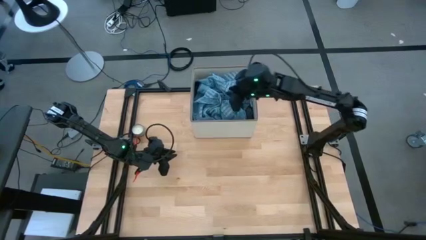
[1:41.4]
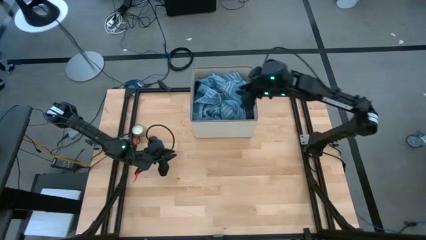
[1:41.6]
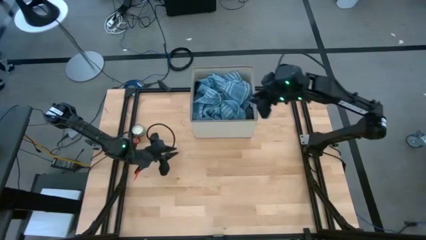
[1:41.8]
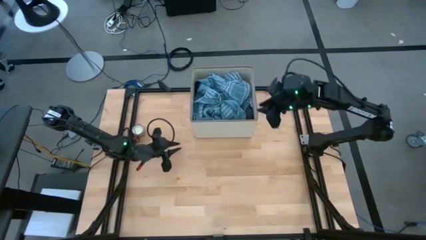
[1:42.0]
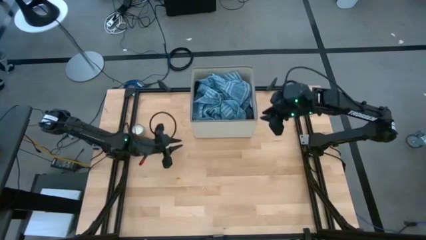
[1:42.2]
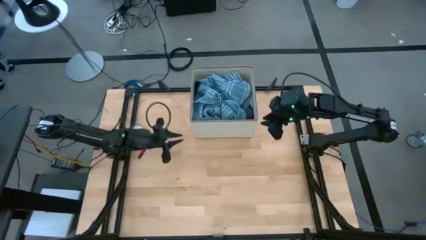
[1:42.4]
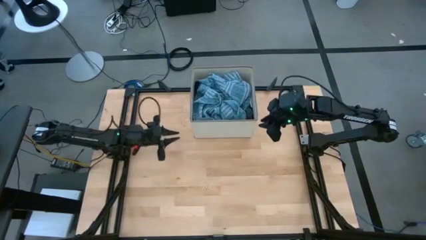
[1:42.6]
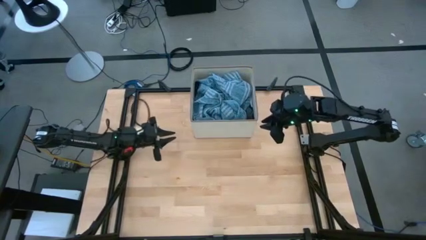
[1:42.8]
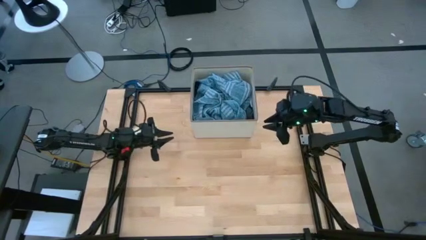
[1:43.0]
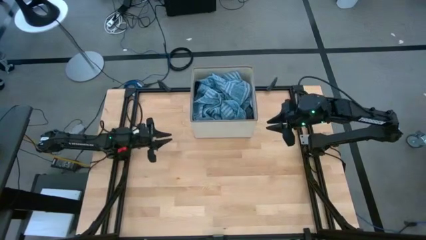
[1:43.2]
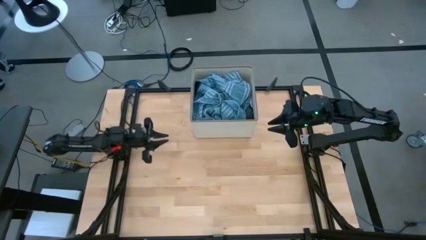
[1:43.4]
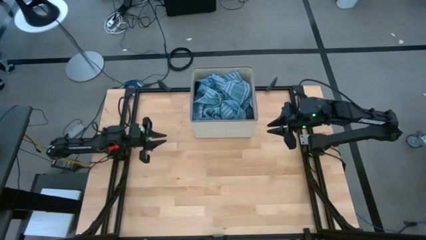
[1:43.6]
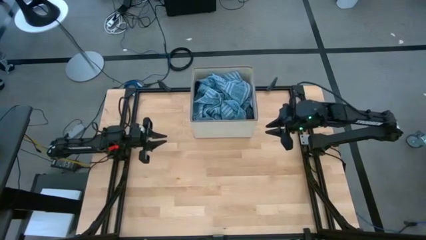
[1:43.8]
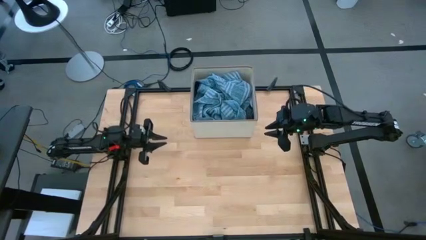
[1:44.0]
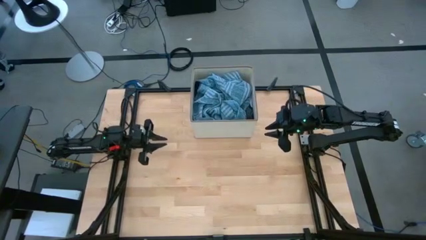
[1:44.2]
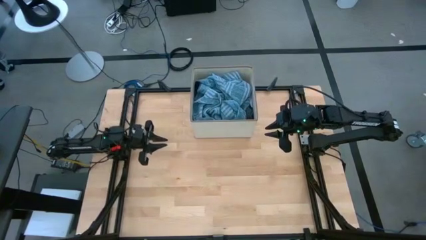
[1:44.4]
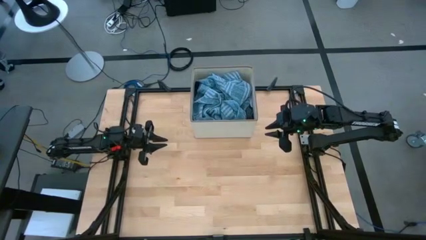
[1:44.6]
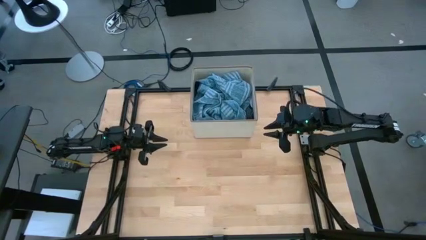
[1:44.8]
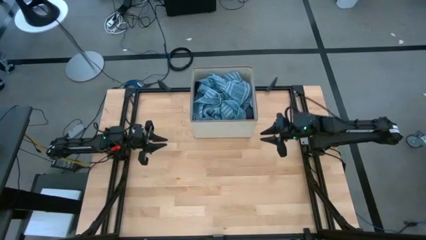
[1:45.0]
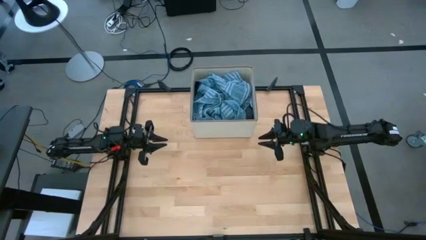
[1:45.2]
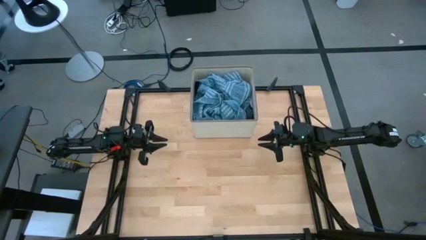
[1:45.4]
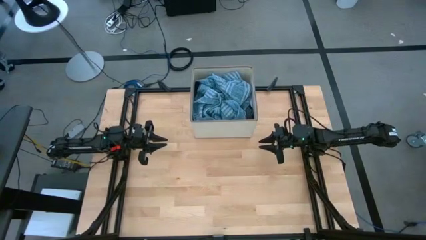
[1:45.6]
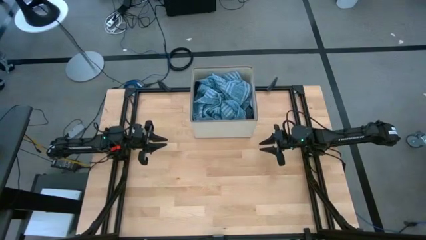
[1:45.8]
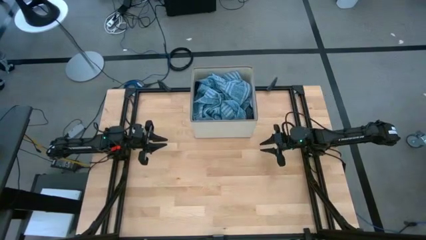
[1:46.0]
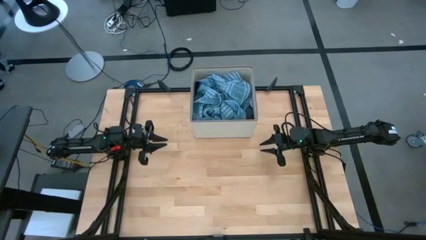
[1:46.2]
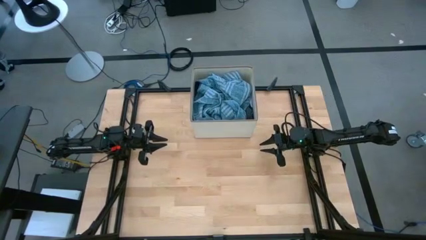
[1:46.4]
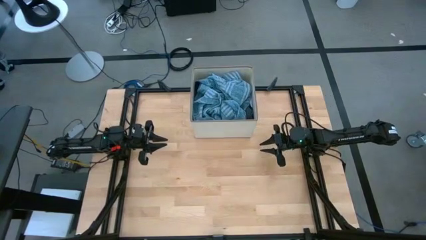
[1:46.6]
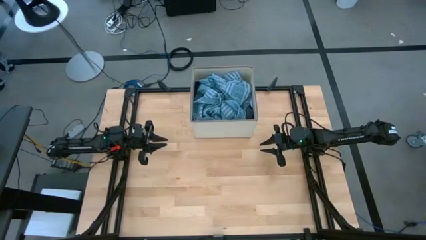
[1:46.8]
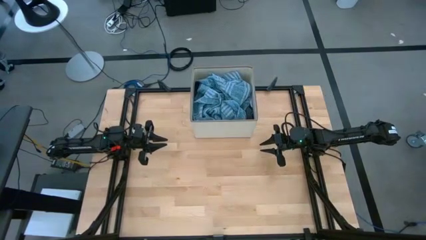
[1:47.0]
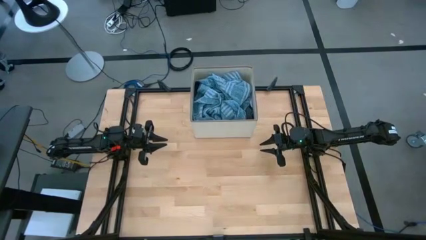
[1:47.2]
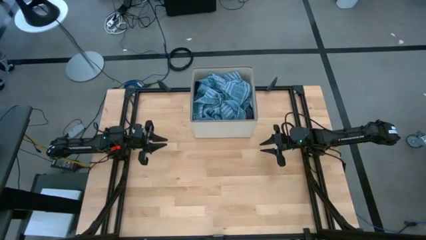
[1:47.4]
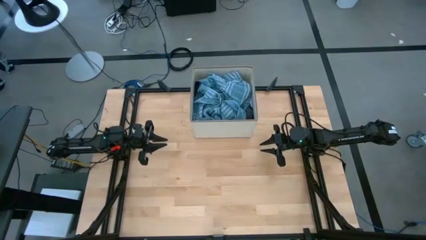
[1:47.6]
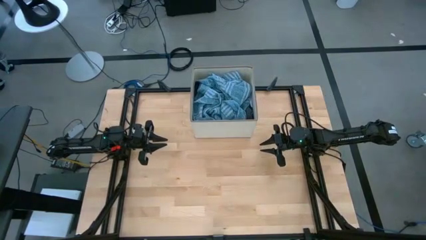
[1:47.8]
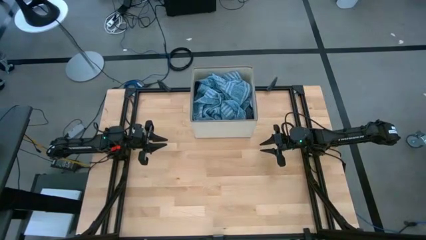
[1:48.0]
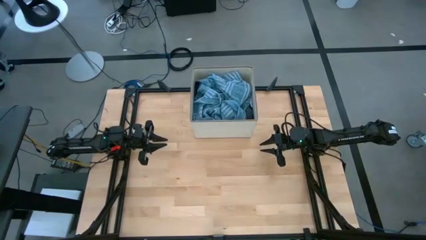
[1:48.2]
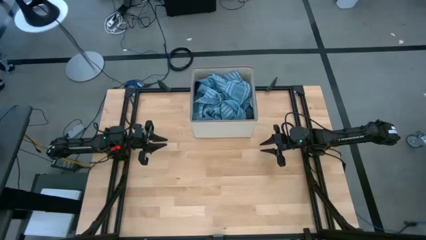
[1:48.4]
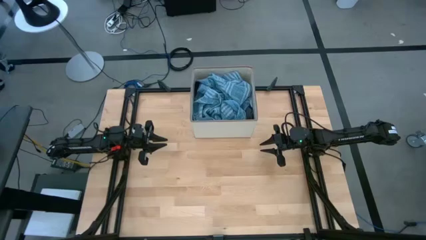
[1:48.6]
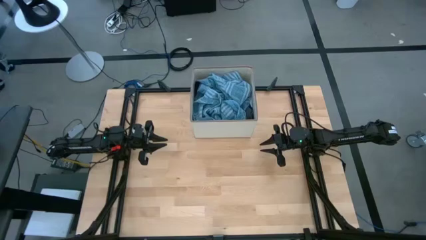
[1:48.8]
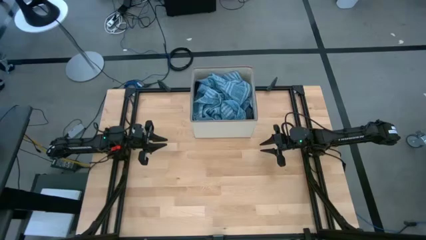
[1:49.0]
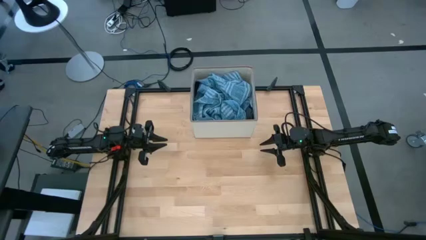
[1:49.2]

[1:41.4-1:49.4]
Task: Sort clothes
Return to Home Position

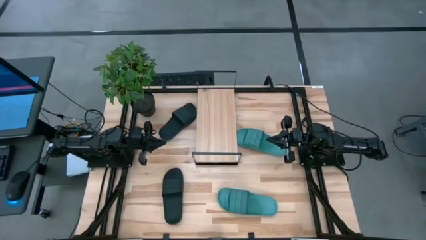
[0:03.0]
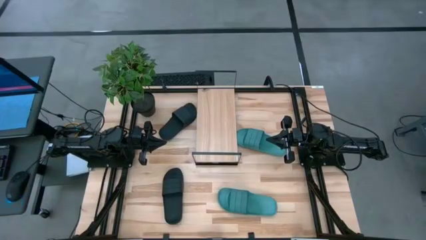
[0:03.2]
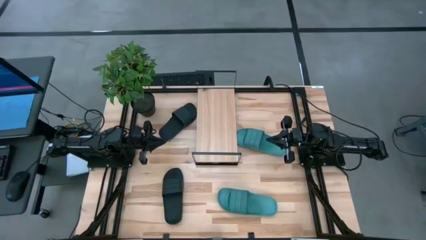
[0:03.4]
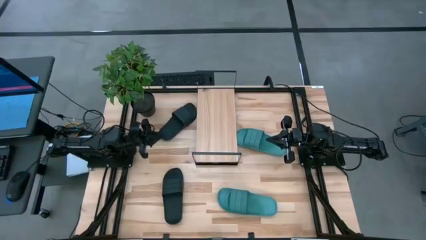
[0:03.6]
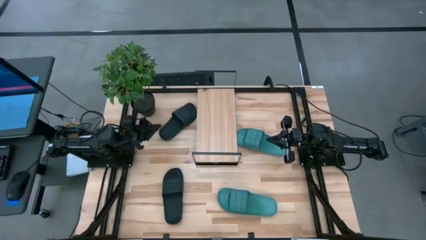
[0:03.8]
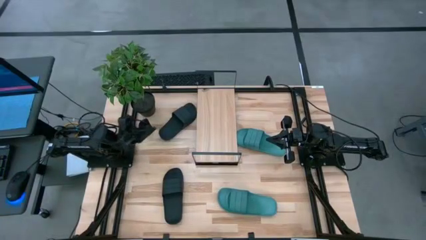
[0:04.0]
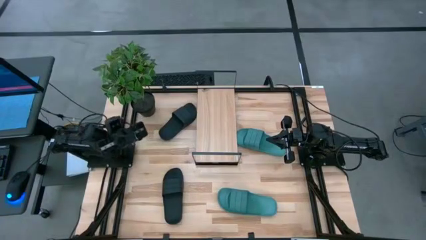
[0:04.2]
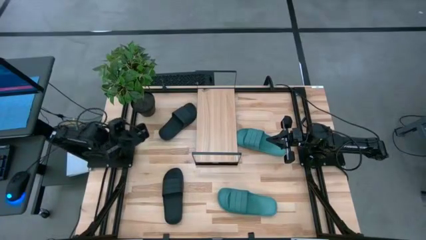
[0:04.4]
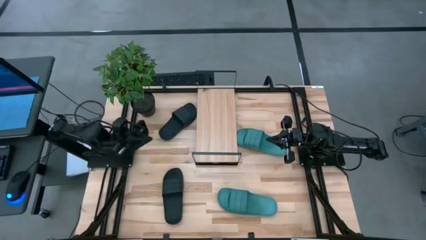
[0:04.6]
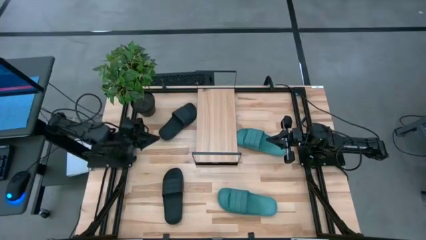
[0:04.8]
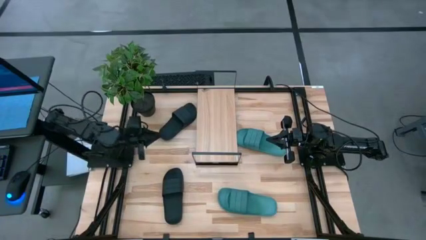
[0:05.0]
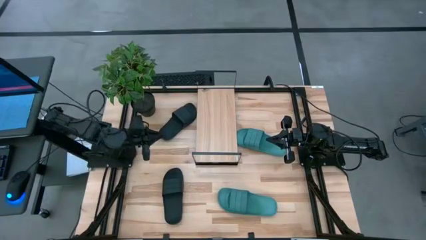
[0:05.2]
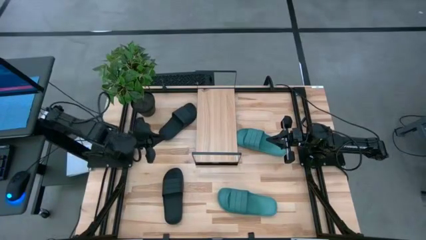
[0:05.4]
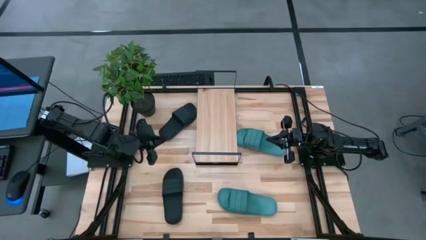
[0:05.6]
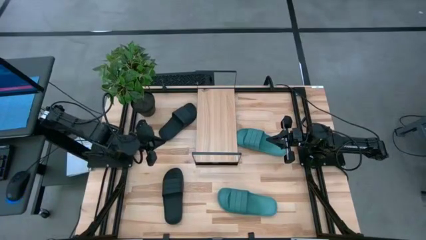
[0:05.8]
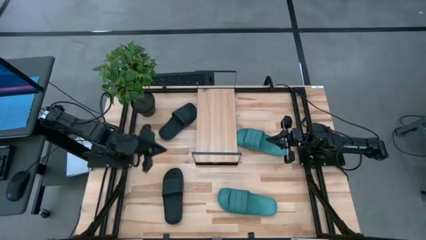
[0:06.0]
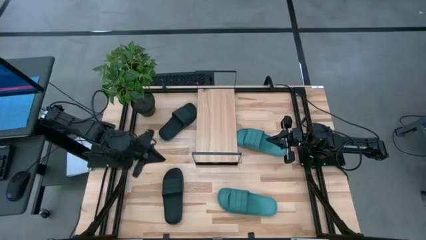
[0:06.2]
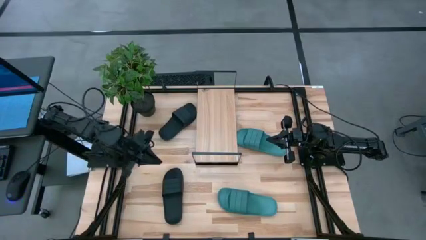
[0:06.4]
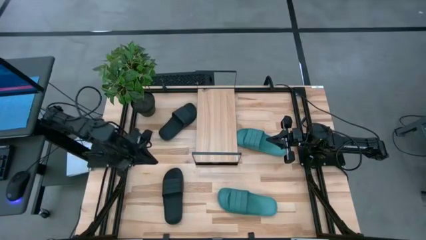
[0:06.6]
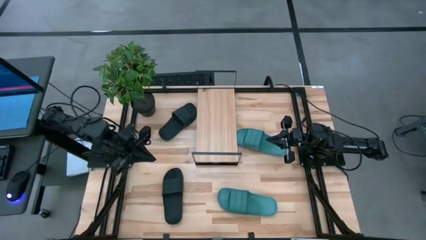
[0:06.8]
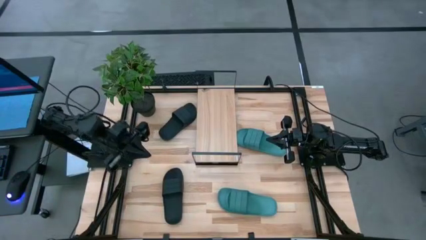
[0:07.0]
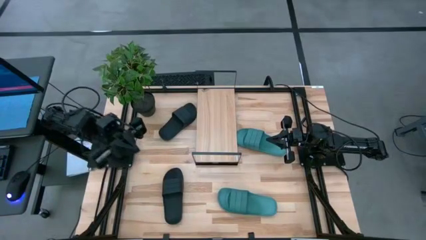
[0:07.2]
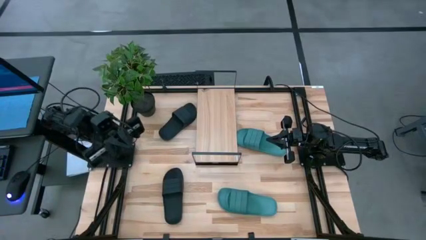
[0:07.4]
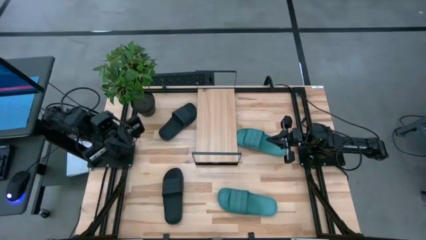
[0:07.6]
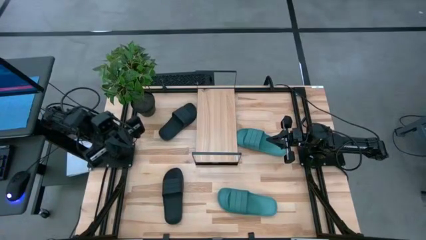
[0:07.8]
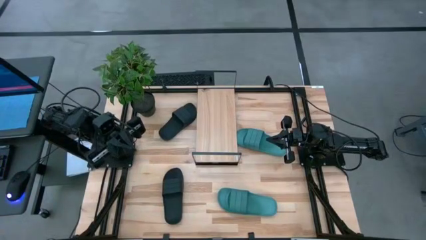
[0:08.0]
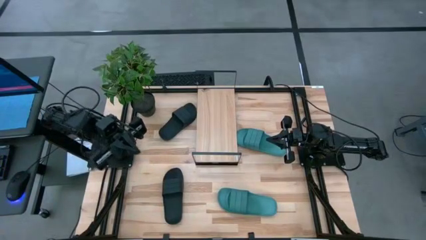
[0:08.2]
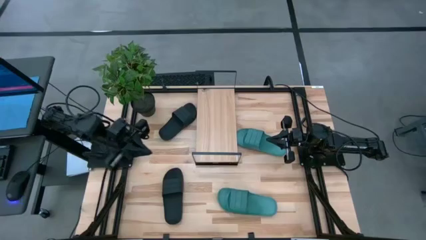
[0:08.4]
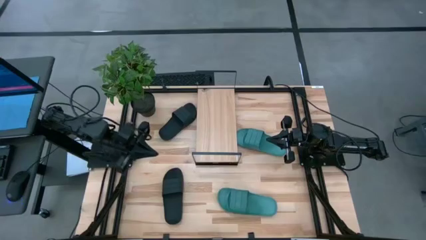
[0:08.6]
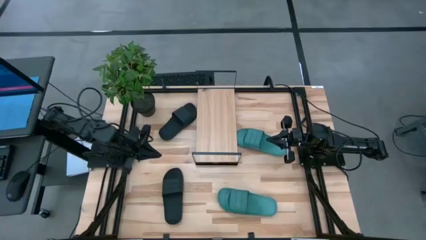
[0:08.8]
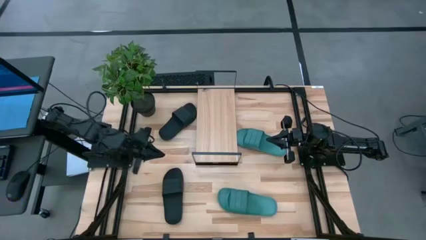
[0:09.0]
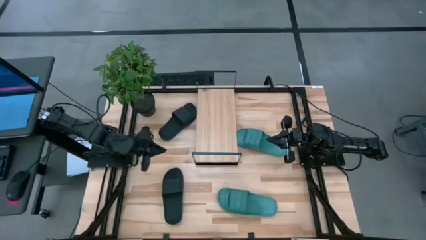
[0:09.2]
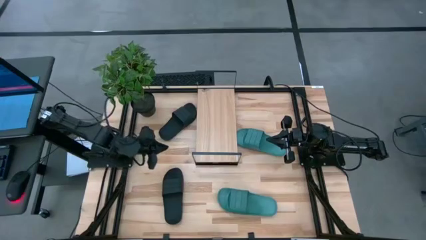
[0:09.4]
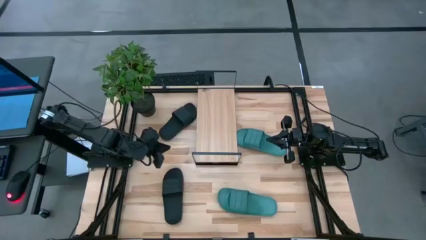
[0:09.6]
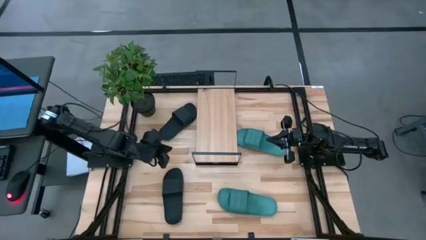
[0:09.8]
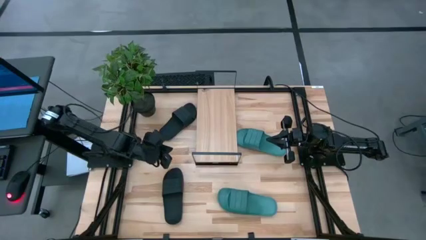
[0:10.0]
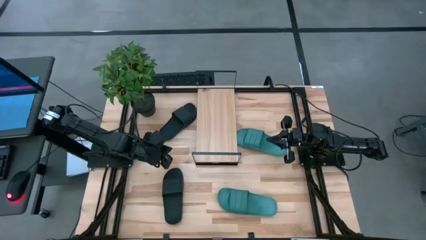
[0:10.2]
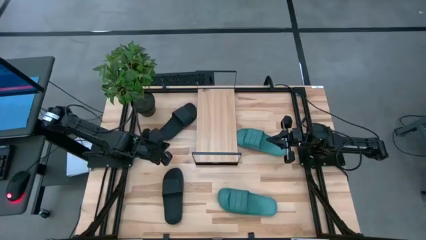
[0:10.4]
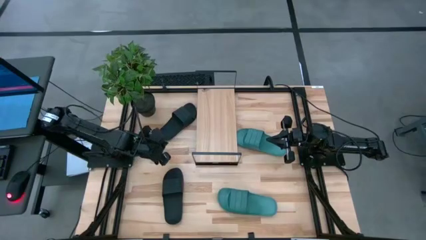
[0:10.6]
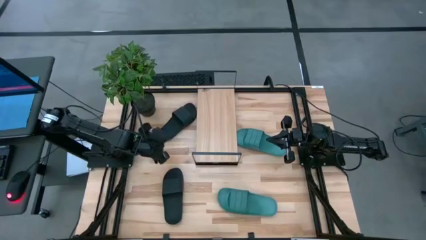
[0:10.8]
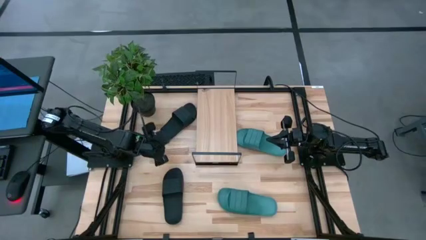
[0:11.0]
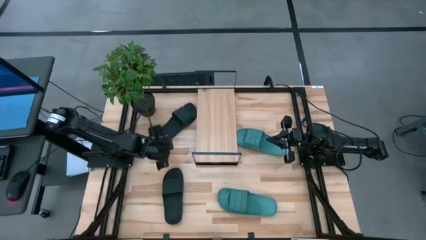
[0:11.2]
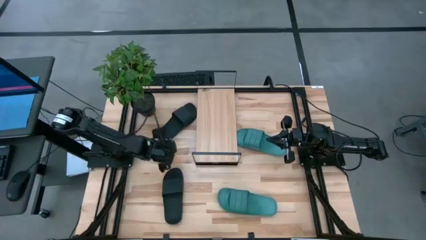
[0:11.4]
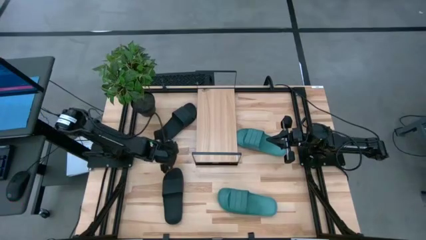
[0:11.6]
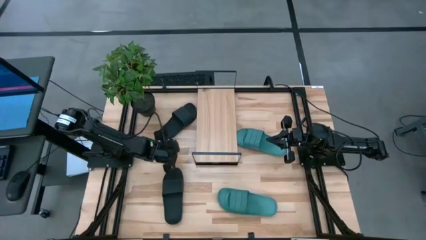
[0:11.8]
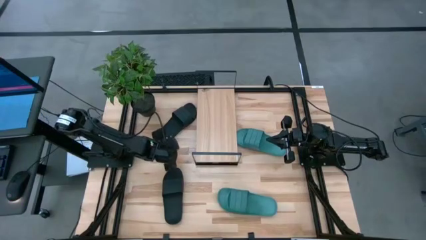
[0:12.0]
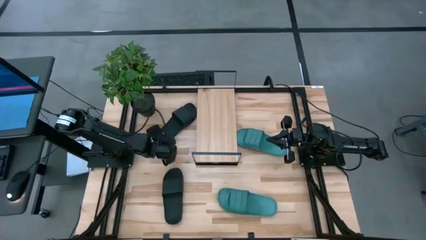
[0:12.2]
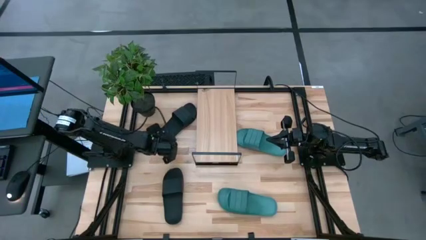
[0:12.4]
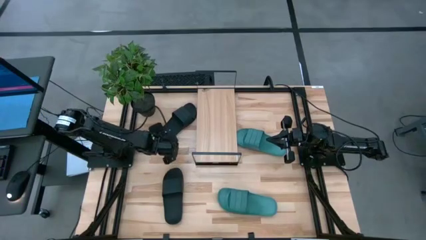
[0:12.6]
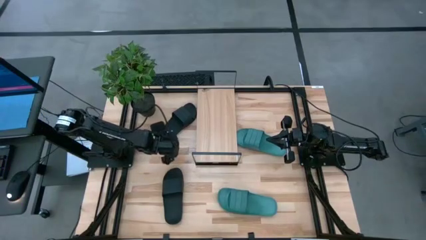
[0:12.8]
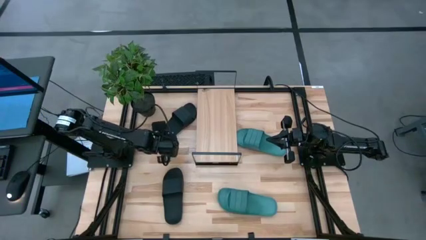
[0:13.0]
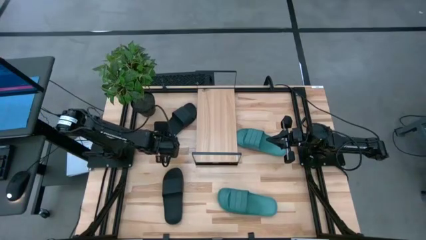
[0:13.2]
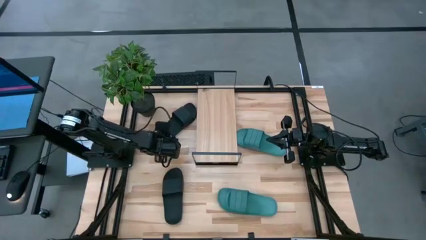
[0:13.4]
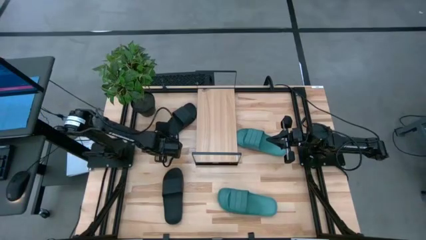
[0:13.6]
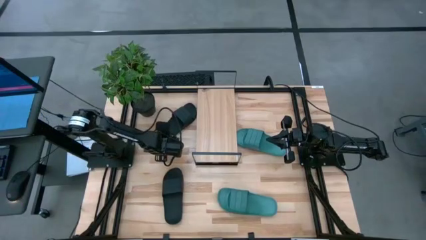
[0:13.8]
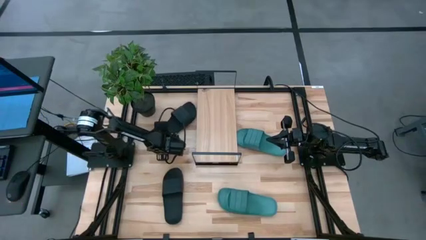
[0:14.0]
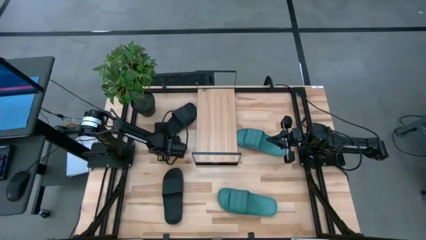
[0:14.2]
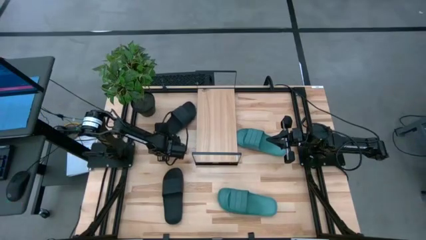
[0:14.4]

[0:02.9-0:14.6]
Task: Pick and place slides into the shelf
Put the top black slide on the shelf
